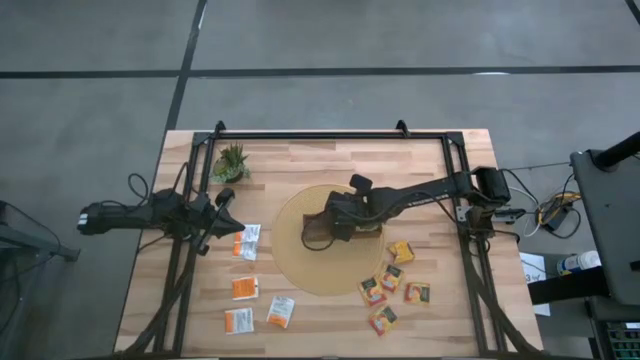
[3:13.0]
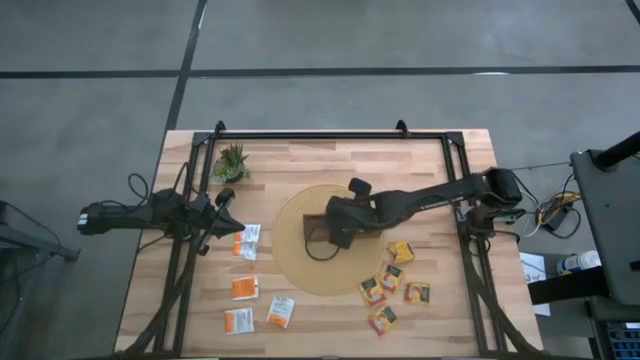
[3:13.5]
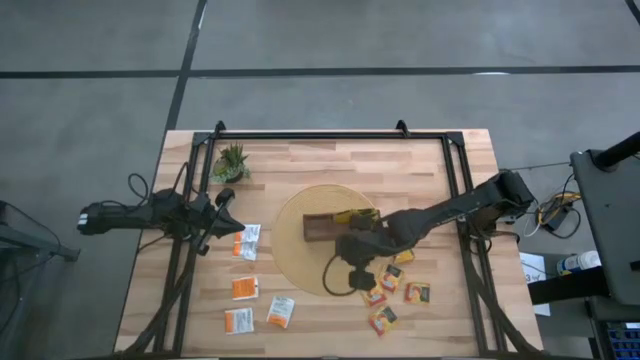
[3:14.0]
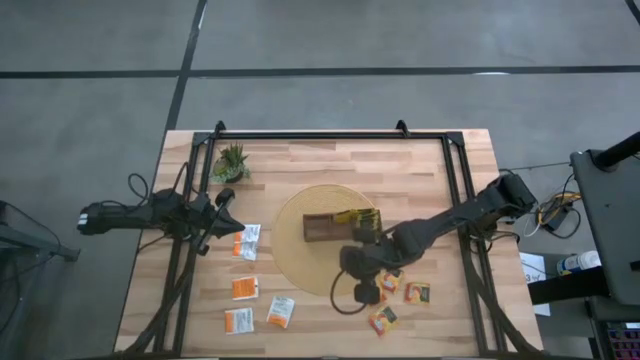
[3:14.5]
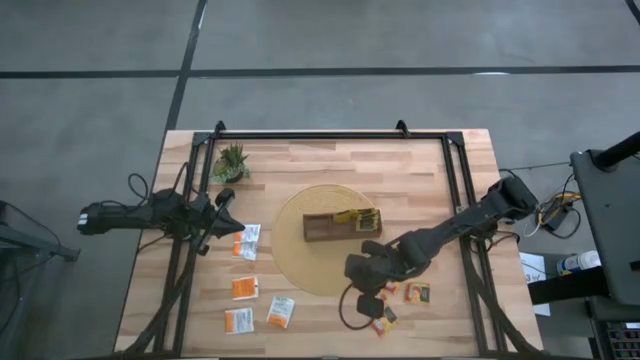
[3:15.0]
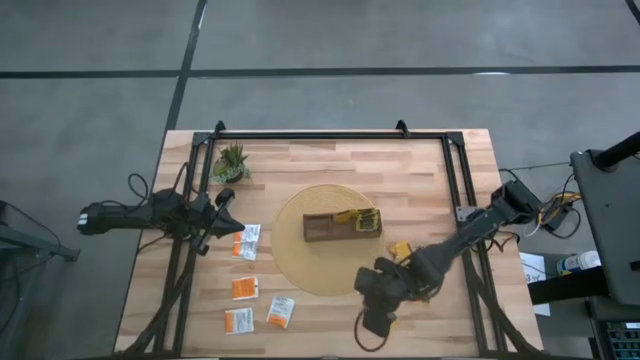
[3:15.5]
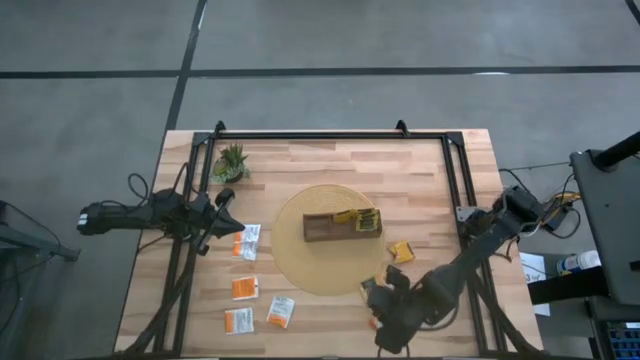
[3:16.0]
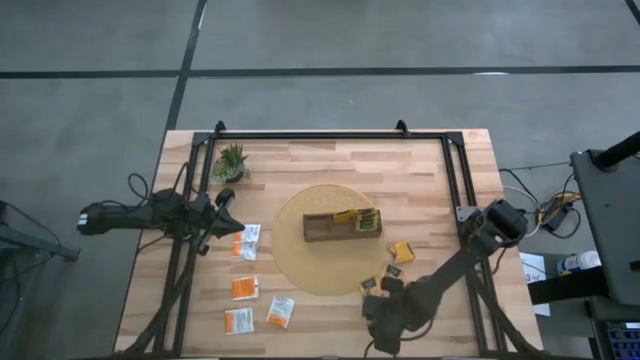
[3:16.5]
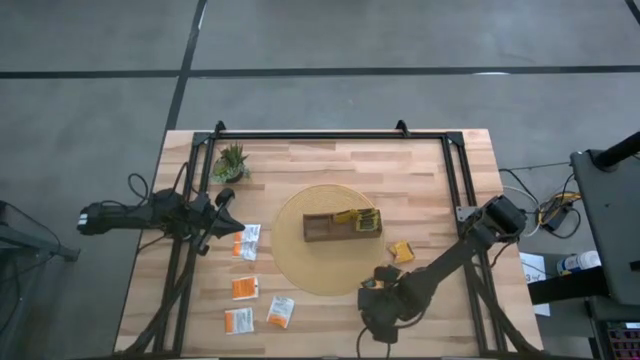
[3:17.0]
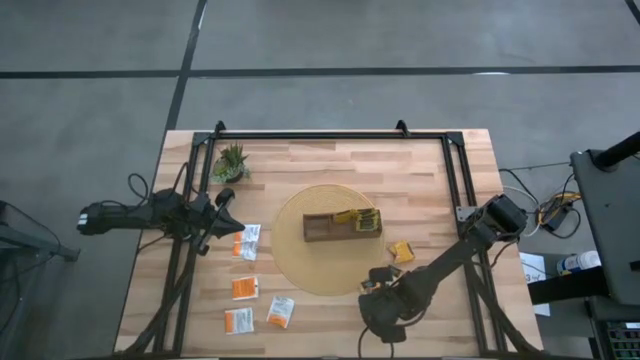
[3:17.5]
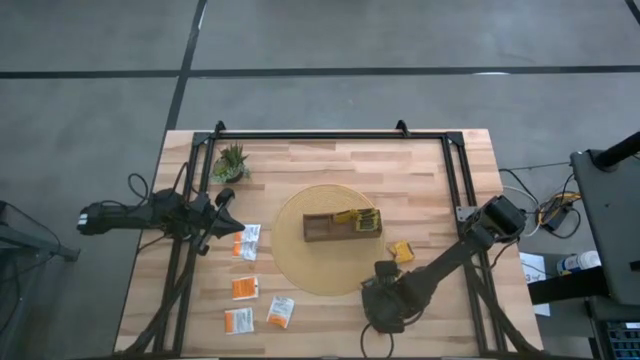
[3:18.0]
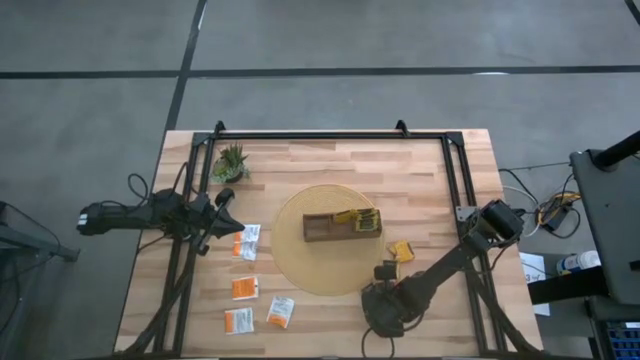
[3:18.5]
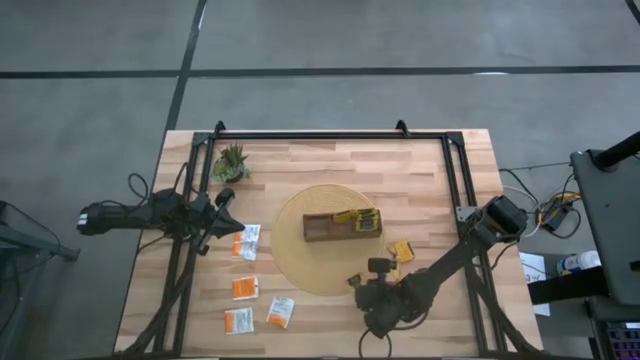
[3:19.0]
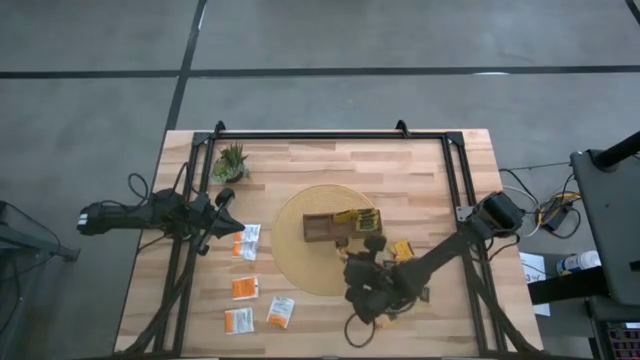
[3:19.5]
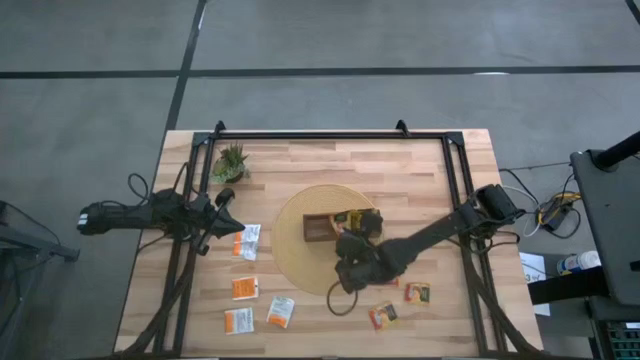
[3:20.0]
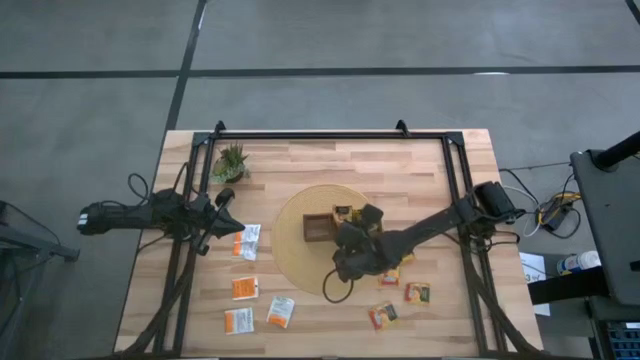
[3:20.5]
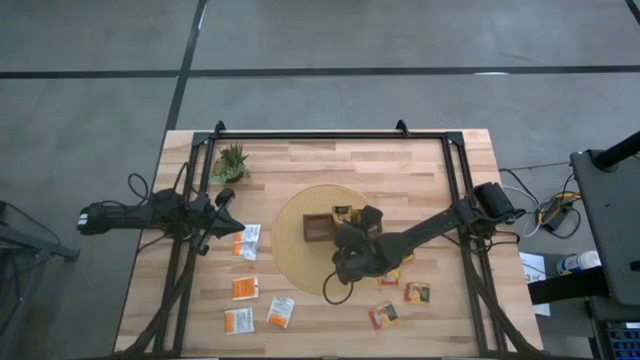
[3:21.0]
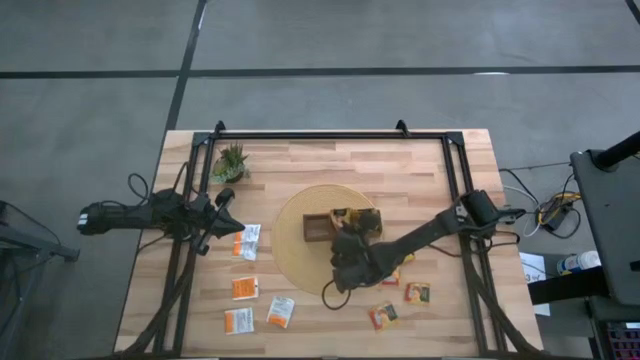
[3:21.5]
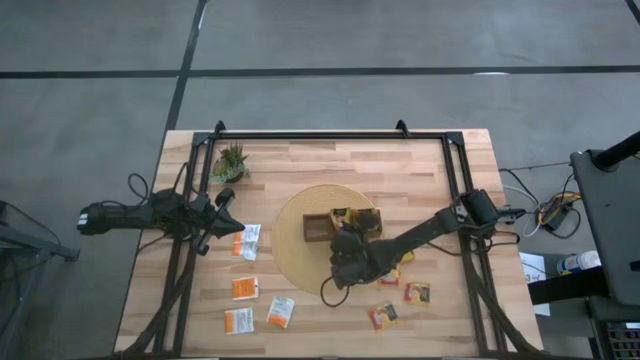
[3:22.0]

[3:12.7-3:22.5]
Task: Pick & Place Tea
Put the orange tea bag into the middle of the wooden organizer

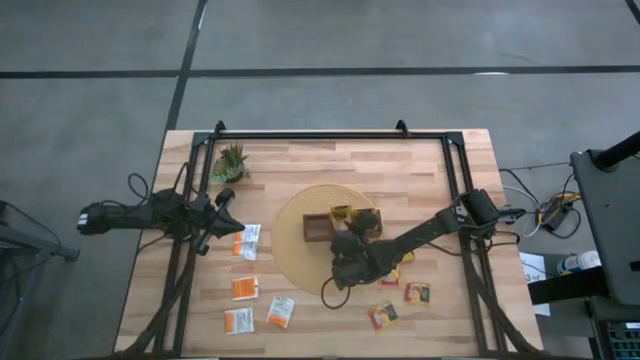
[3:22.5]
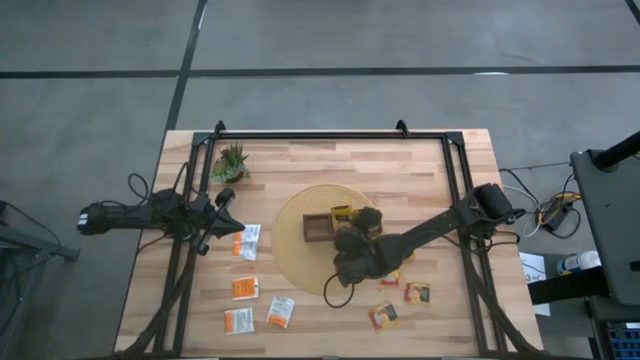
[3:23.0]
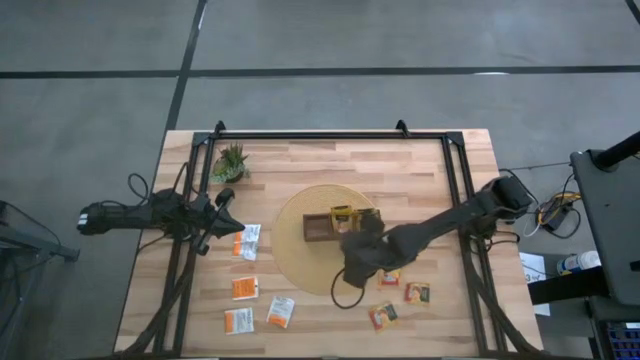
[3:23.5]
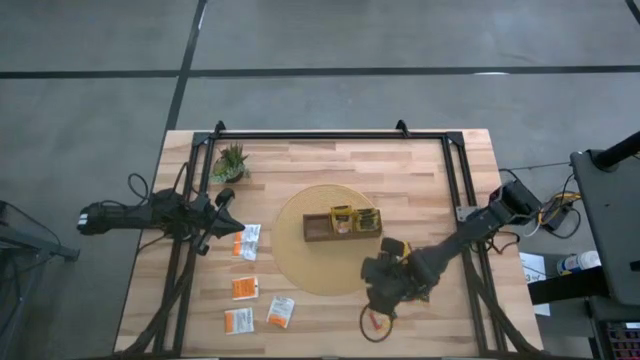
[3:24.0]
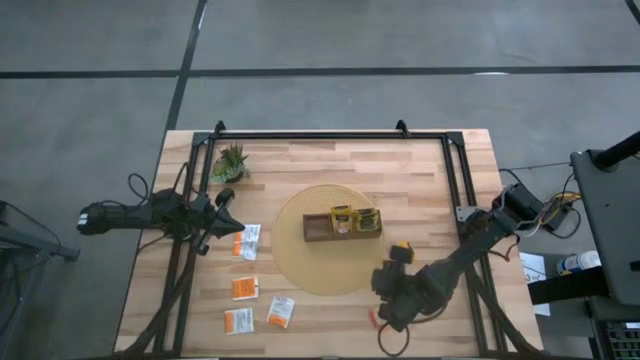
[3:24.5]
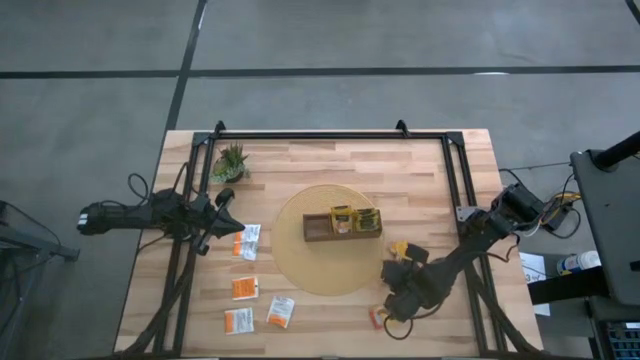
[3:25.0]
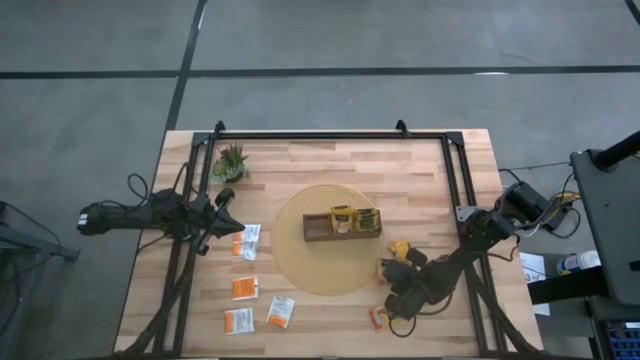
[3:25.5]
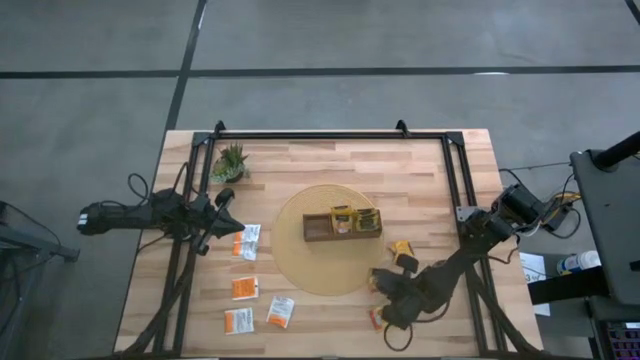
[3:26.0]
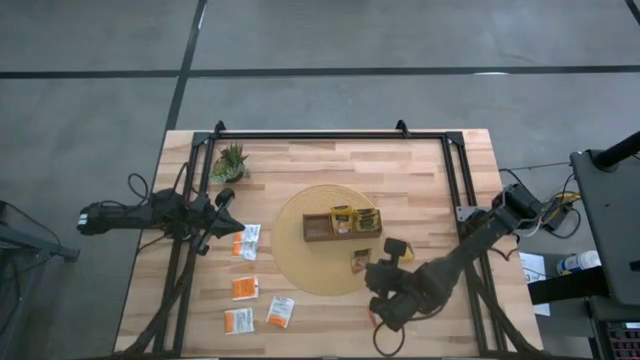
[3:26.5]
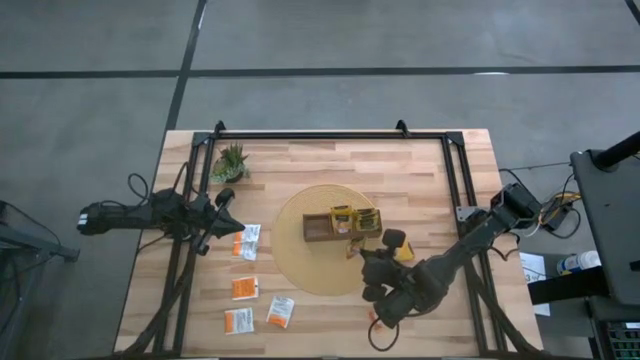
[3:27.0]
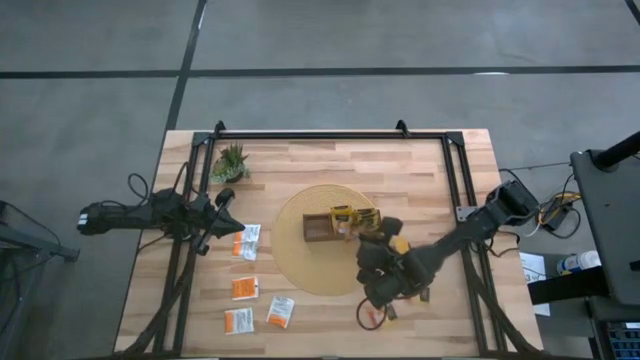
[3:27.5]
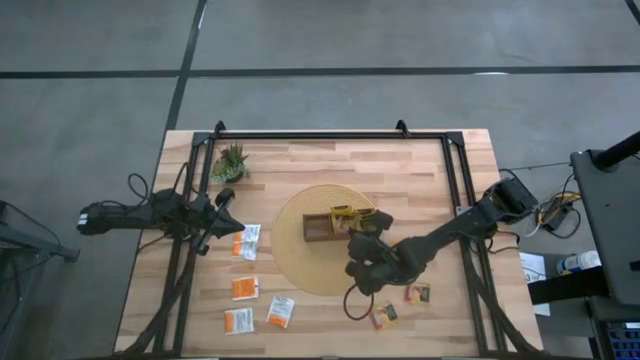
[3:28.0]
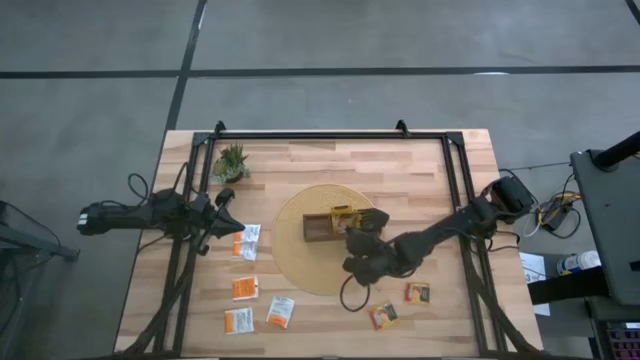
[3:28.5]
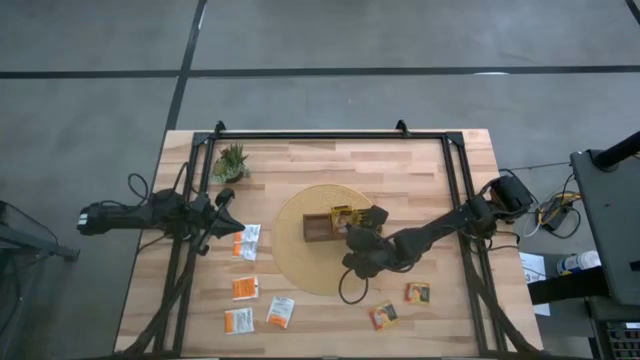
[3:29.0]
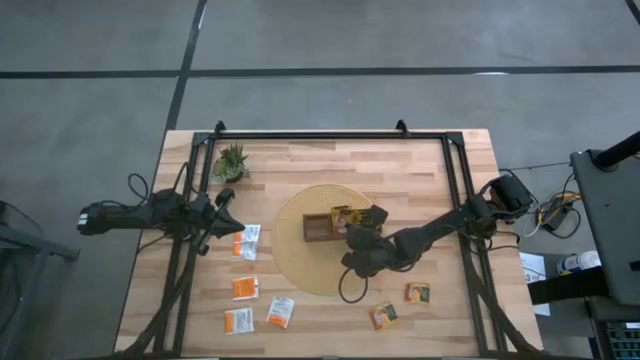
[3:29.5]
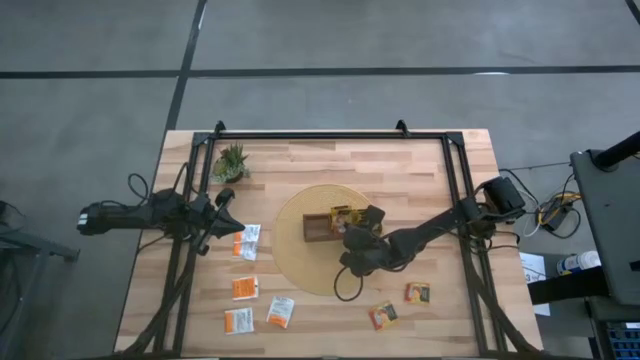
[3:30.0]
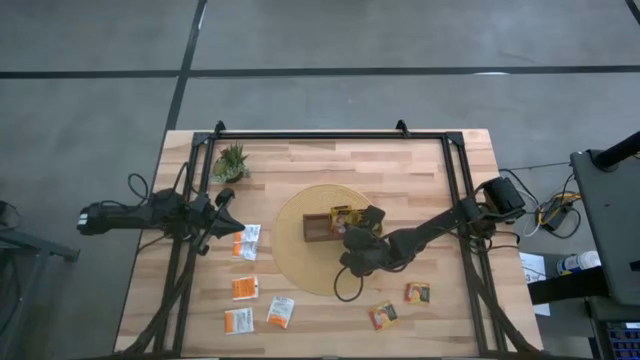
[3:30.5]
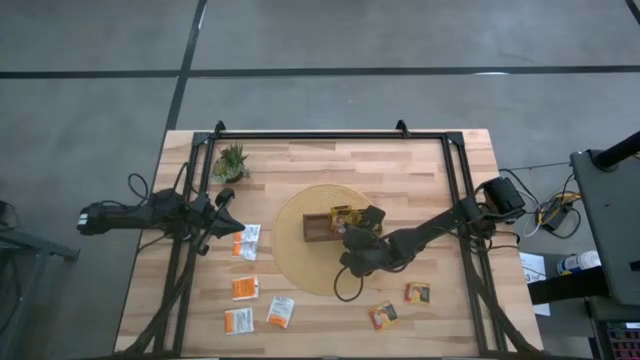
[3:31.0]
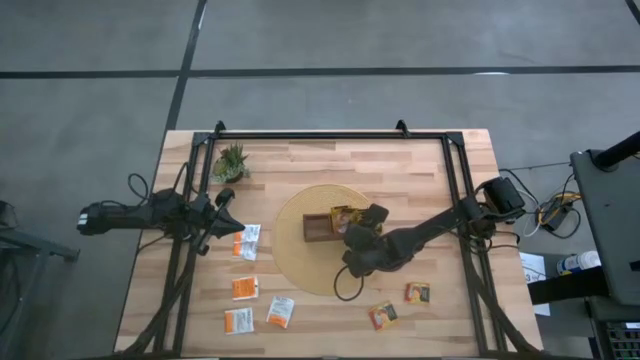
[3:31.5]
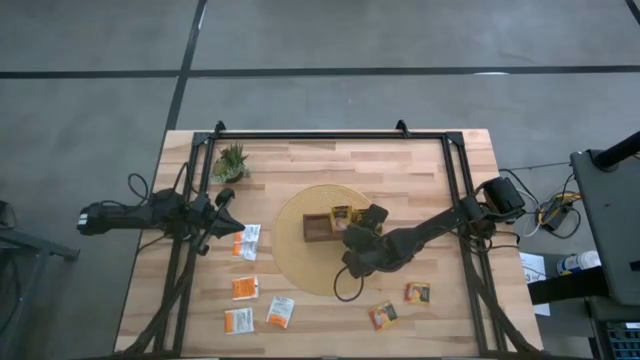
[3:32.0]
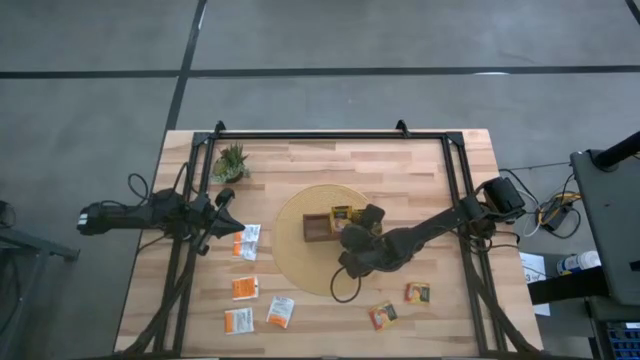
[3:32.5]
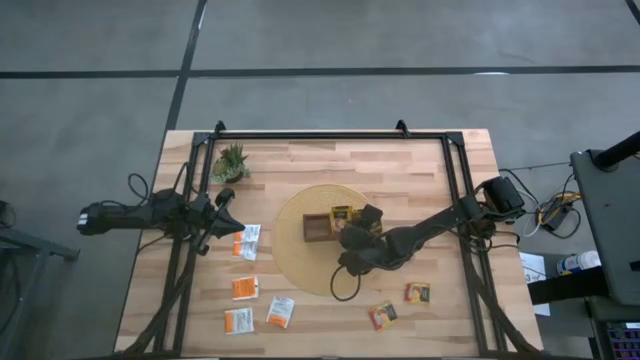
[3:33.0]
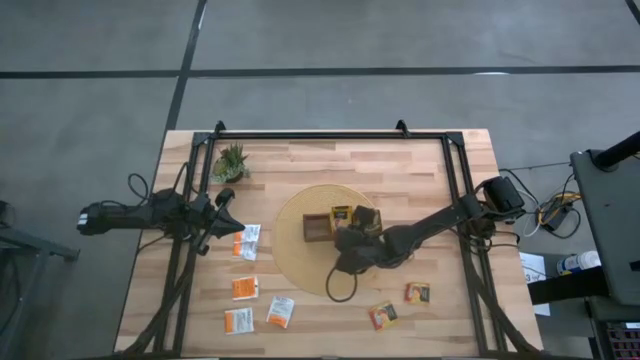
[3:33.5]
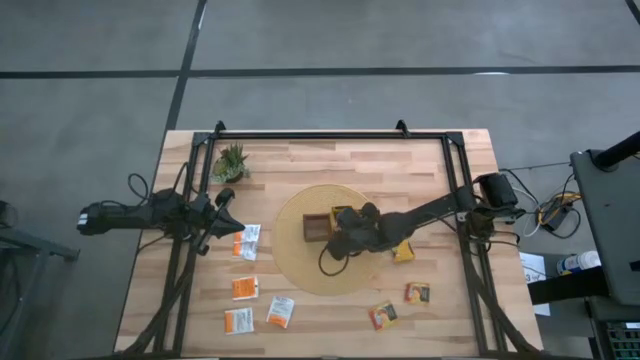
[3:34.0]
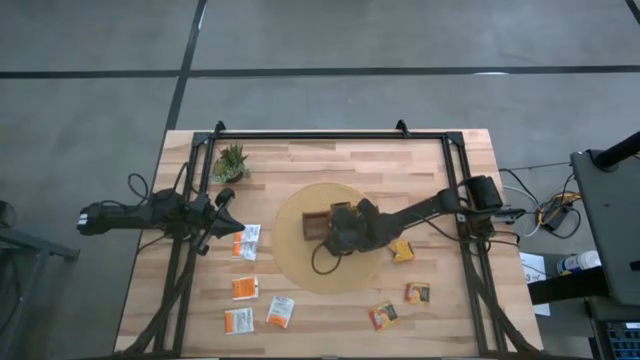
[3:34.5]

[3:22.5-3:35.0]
Put the orange tea bag into the middle of the wooden organizer
